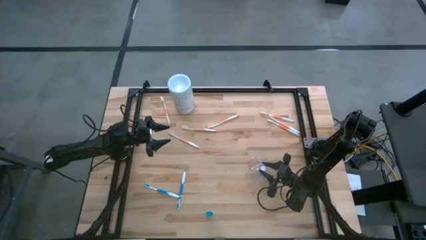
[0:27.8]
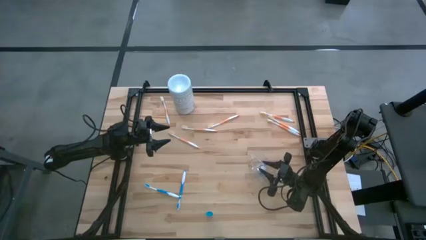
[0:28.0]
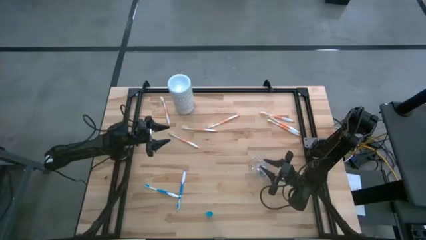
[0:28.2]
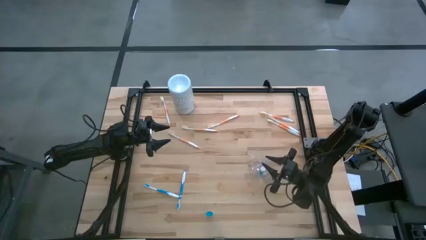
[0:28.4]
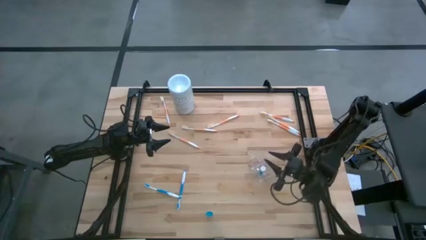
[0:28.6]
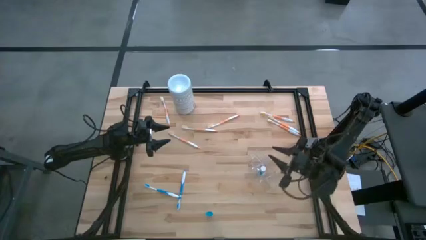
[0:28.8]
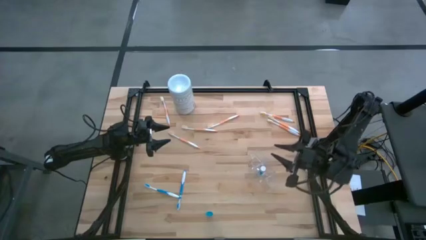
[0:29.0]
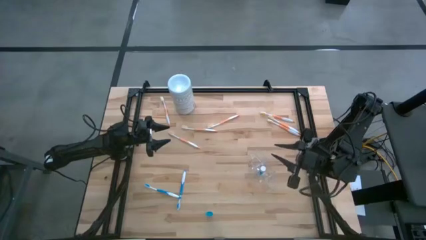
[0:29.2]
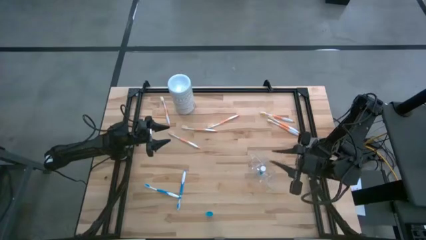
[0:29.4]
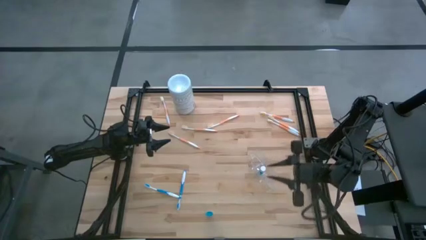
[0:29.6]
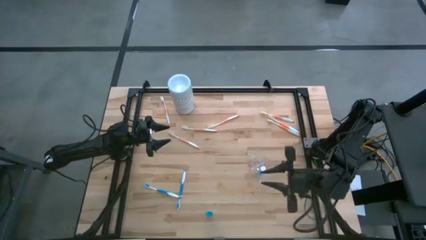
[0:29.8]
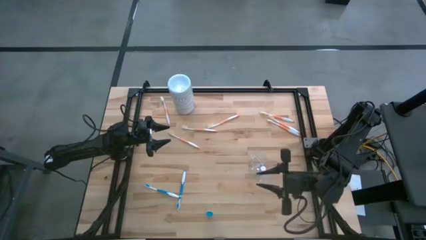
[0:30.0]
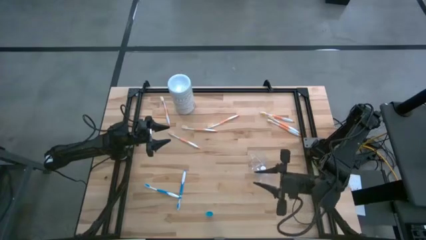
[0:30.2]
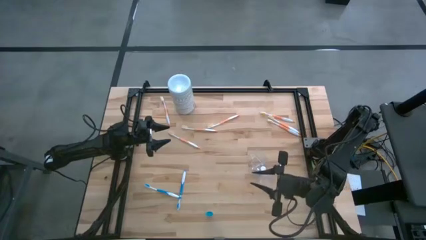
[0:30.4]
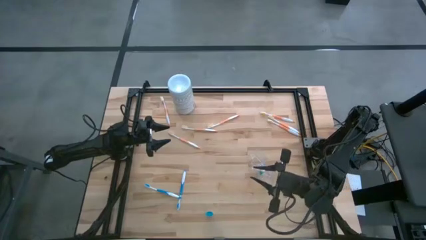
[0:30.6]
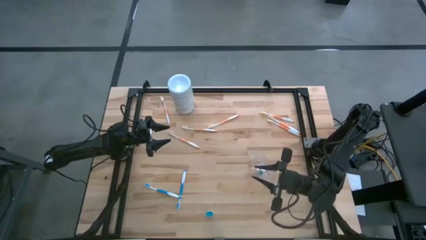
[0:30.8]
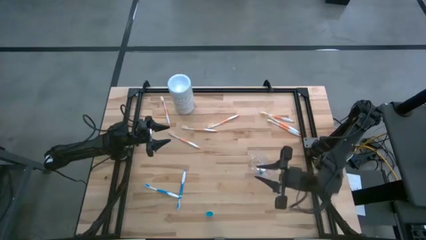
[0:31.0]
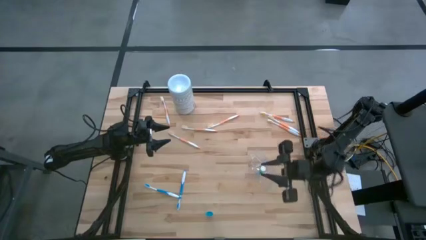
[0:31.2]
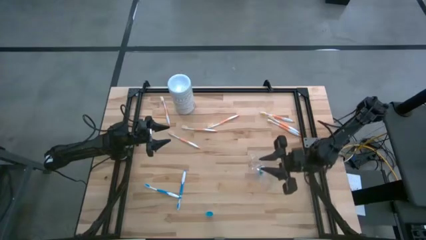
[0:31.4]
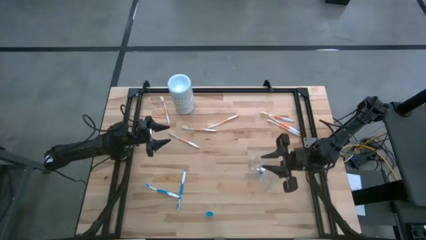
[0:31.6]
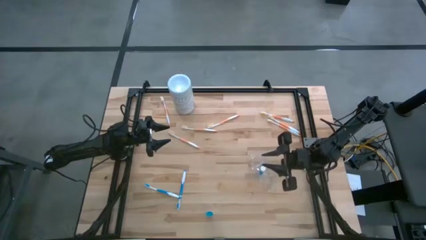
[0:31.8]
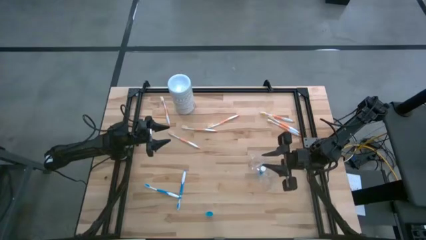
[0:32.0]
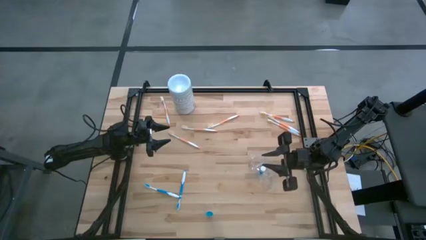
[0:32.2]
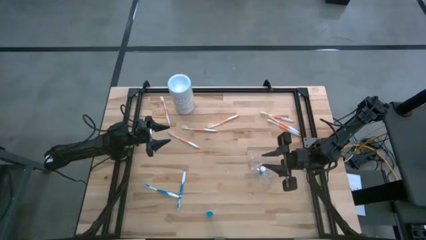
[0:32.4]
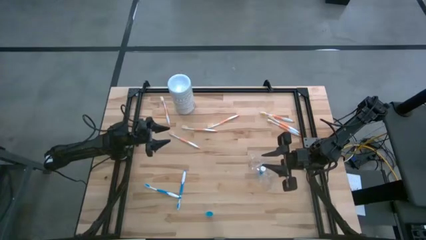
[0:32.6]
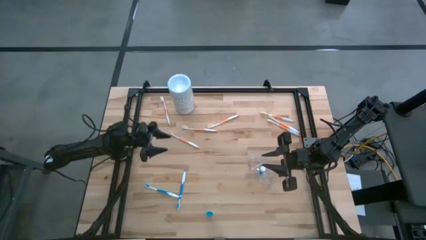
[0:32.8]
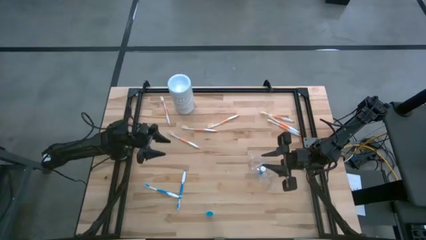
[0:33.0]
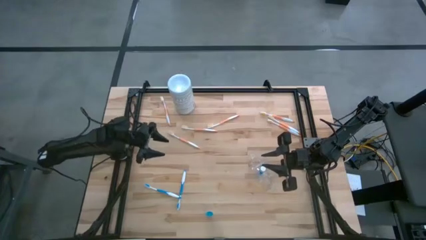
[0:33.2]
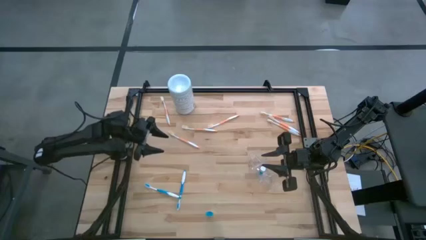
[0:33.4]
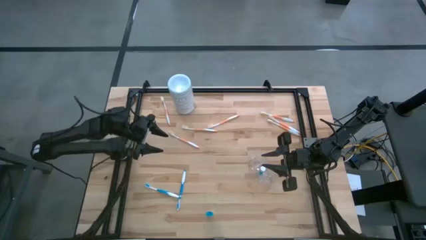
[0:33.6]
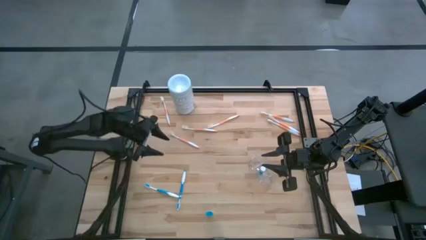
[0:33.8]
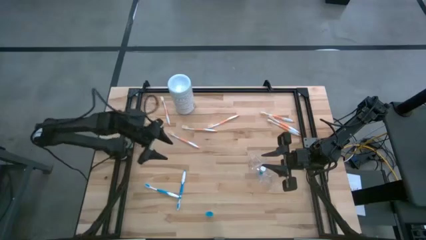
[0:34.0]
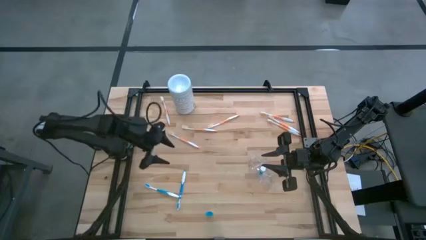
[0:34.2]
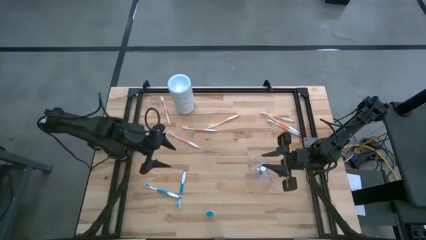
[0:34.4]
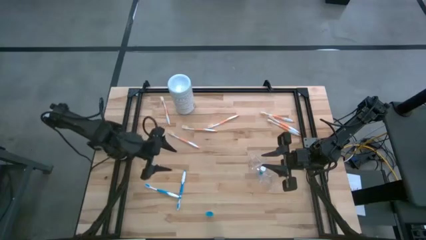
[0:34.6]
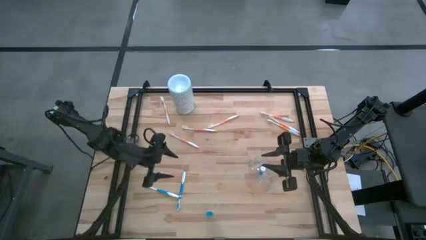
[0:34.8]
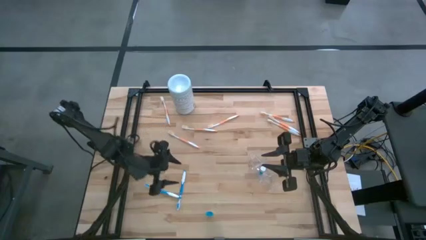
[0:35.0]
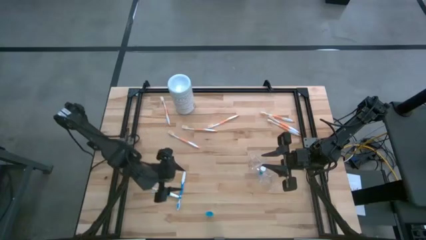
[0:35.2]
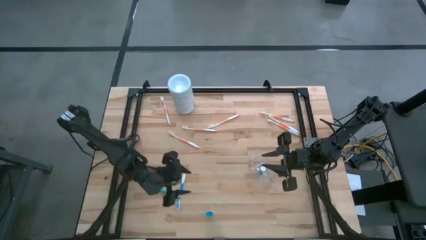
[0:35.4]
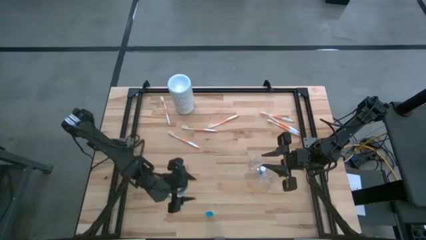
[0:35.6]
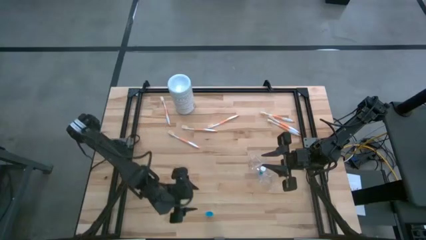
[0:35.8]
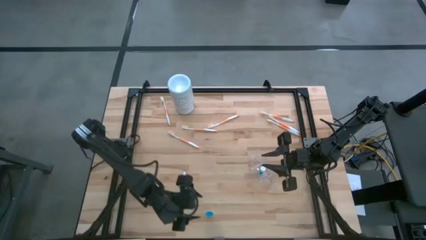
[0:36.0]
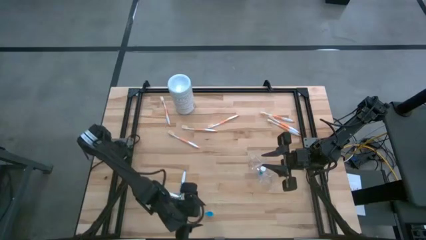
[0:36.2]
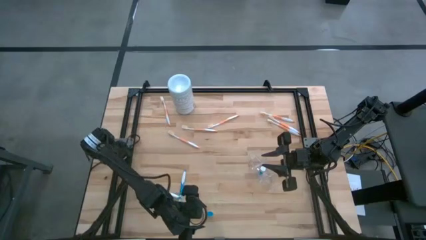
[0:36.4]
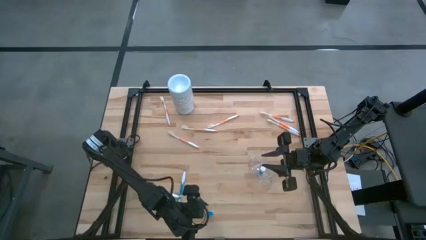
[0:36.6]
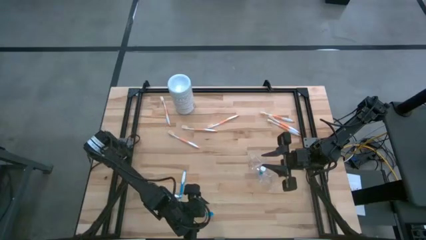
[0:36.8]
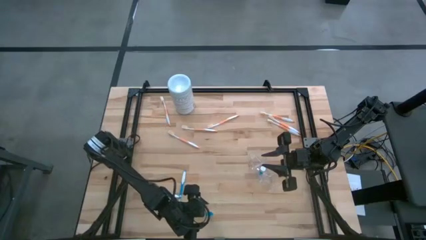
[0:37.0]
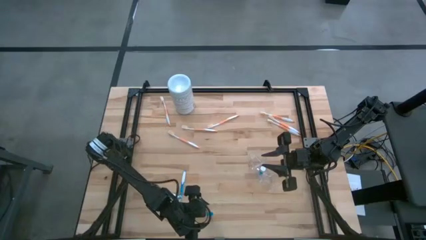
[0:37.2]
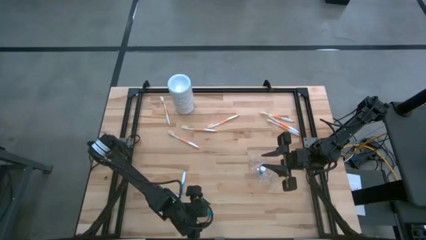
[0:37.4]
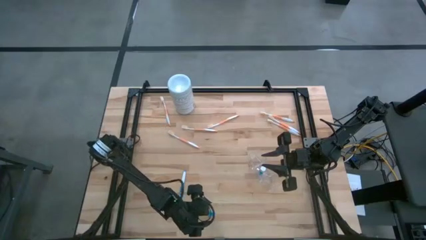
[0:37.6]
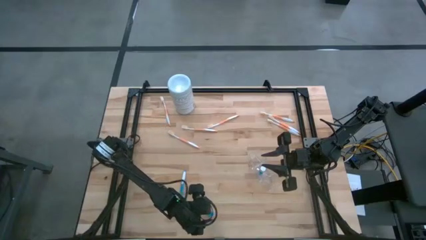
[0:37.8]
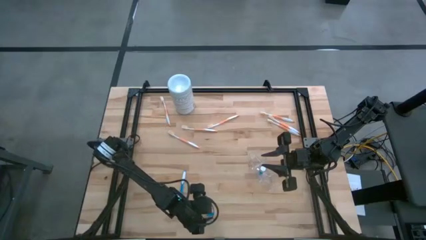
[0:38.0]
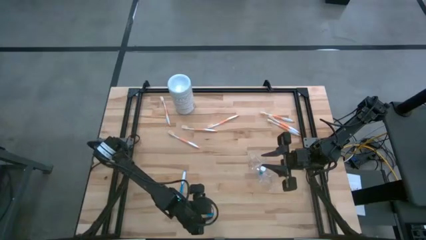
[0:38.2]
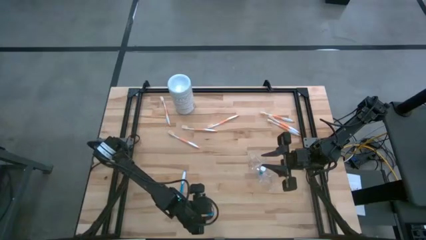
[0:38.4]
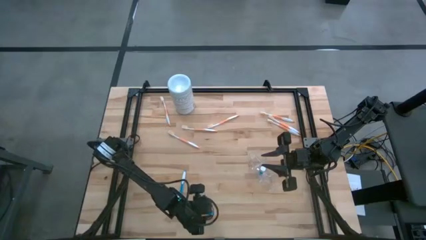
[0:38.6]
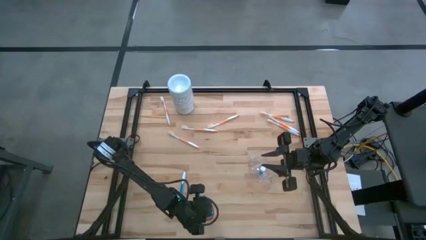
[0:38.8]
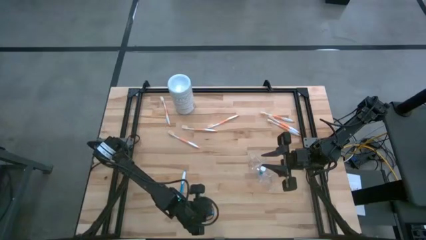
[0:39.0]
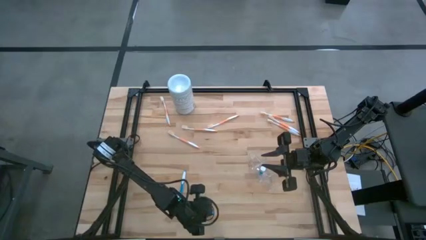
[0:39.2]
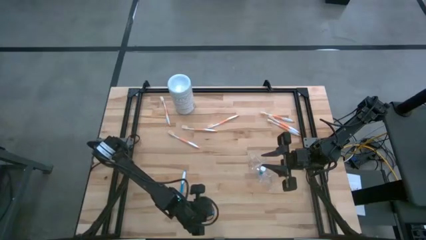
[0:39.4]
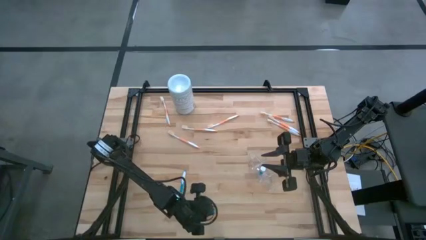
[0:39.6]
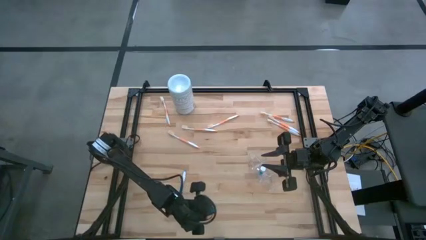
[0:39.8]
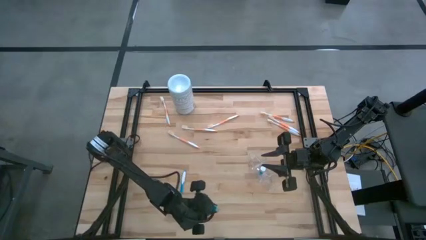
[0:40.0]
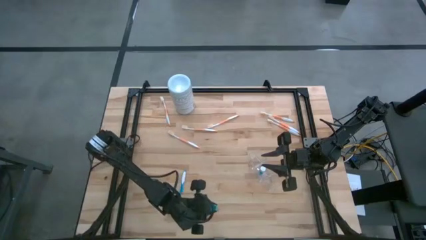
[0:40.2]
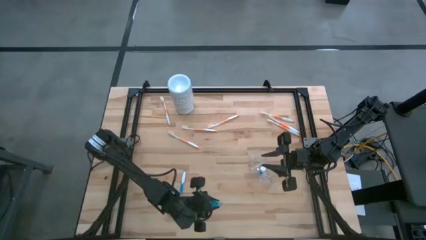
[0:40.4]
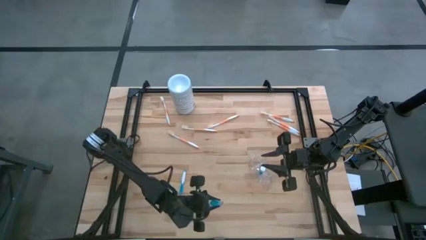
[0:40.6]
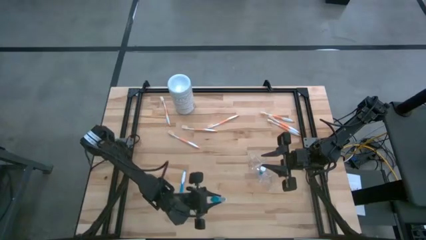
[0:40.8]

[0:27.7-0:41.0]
Task: Pick & Place toothbrushing station
Put the mouthwash into the middle section of the transparent organizer

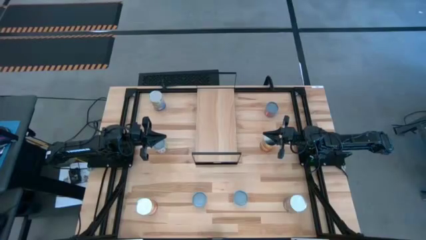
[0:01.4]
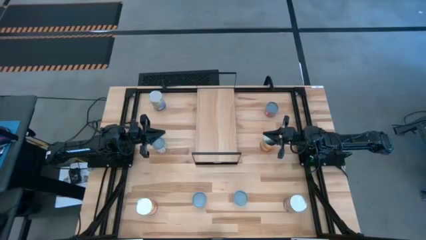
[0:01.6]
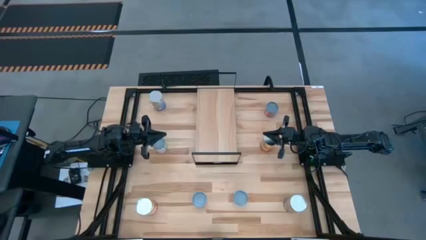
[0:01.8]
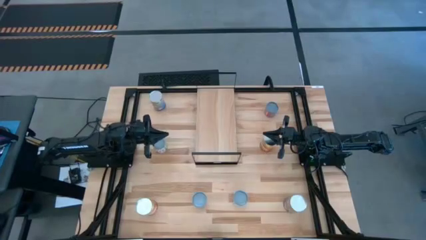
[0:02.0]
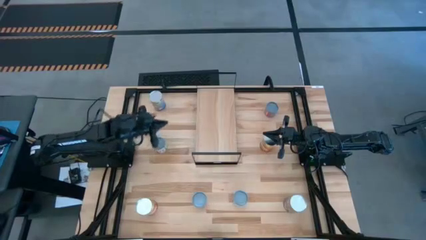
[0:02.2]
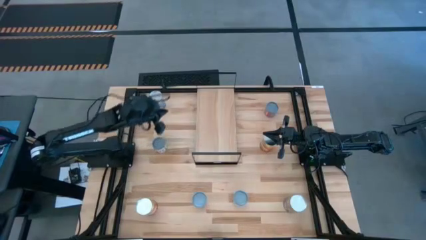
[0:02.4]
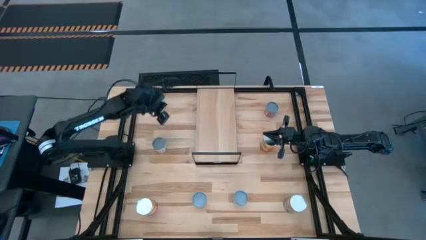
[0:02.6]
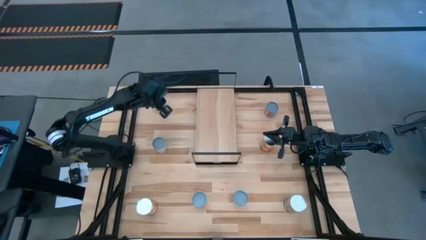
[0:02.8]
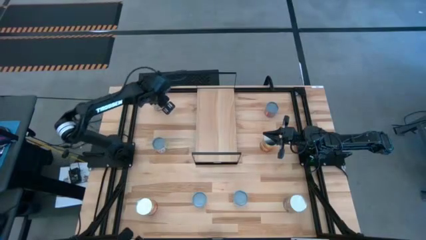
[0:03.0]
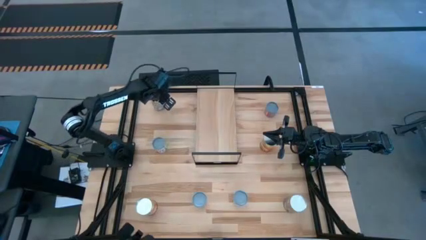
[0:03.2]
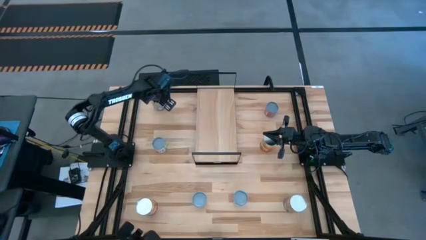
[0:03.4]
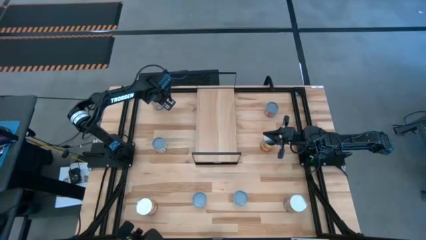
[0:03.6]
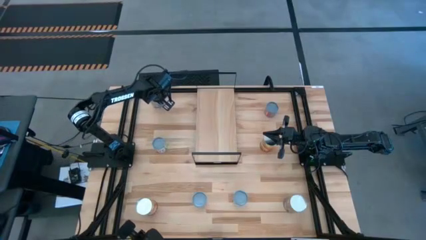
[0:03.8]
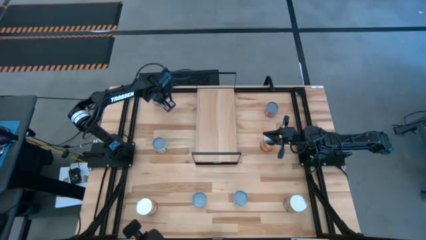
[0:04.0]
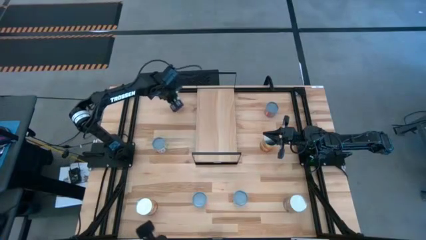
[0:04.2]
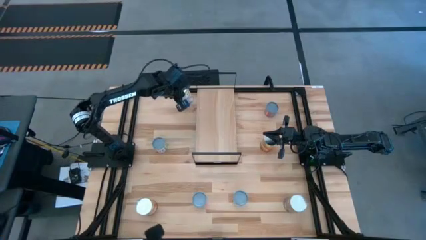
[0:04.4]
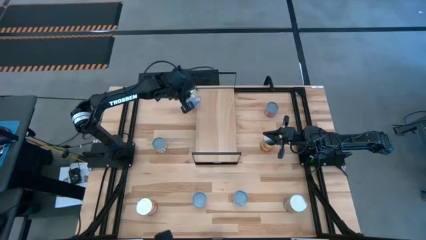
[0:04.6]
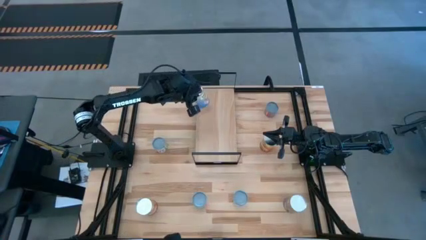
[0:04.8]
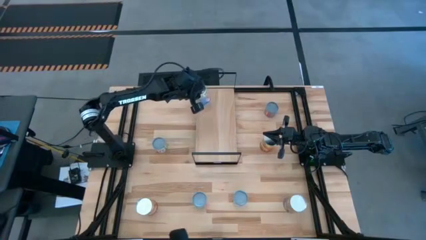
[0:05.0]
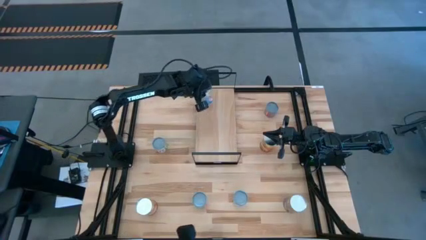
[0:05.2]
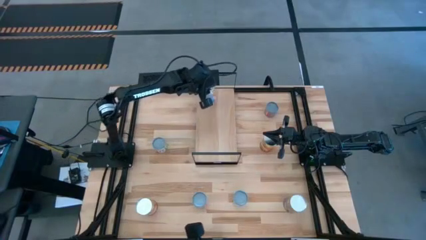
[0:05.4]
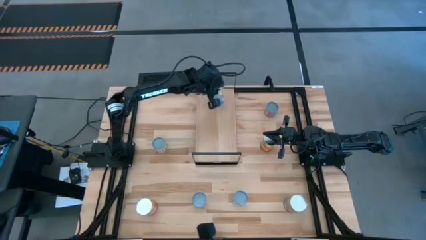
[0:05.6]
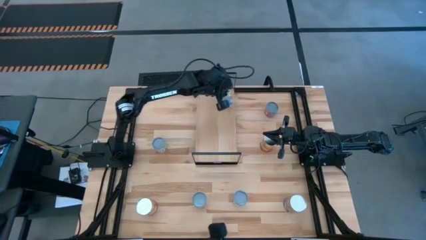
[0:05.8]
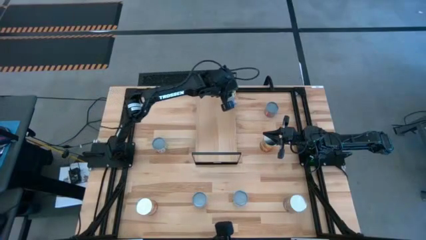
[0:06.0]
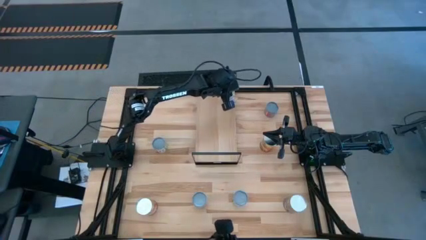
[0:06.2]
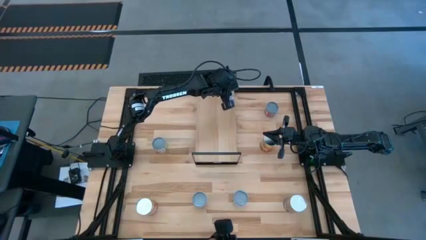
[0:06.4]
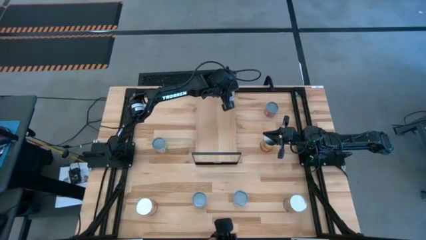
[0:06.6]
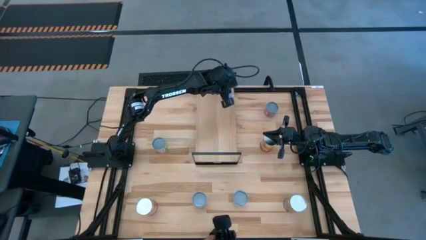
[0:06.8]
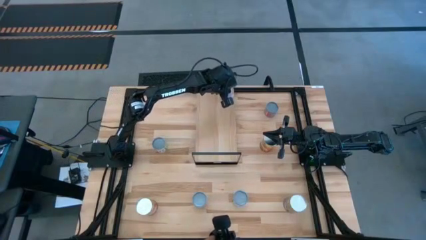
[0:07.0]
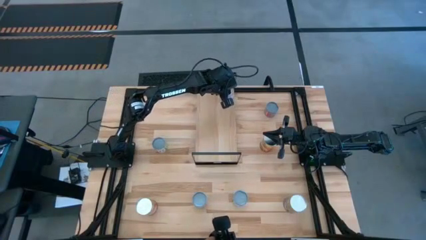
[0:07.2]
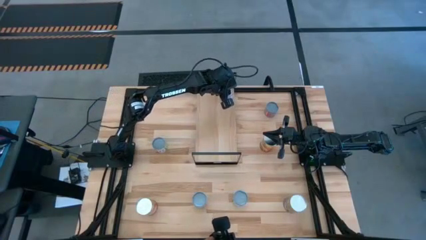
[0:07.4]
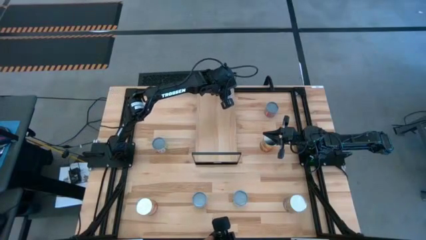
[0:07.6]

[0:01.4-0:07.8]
Task: Pick and place cans onto a shelf
Put the top peach can on the shelf
